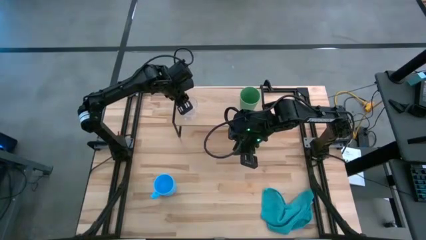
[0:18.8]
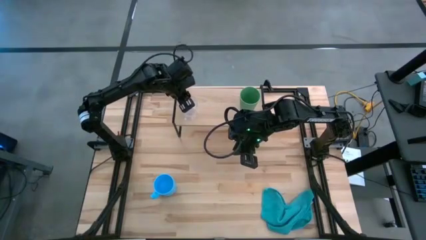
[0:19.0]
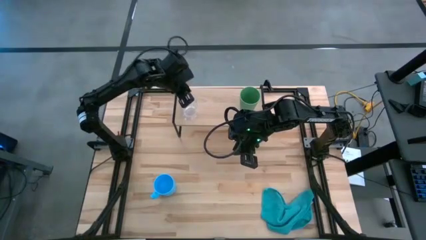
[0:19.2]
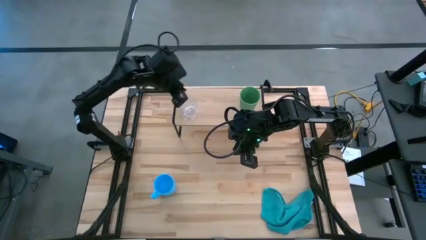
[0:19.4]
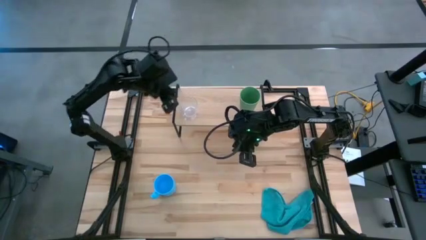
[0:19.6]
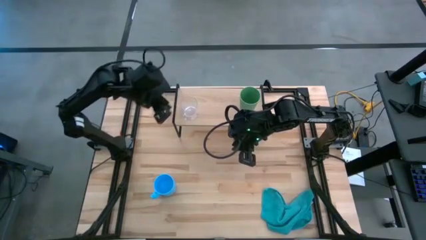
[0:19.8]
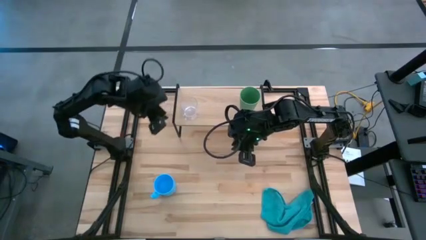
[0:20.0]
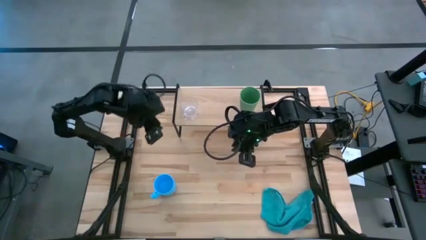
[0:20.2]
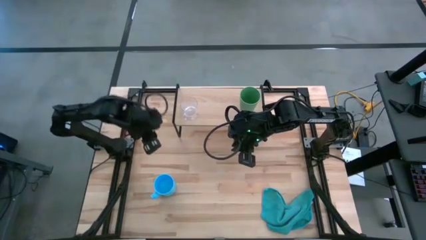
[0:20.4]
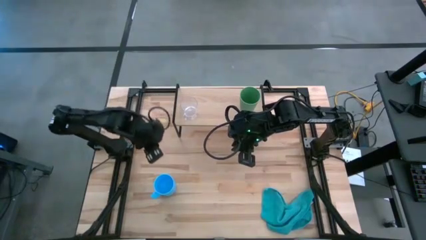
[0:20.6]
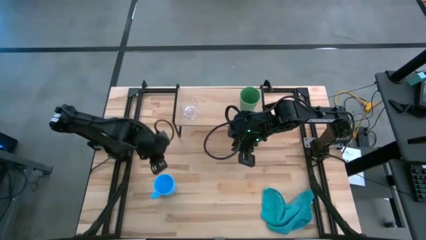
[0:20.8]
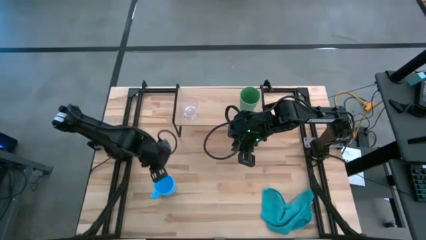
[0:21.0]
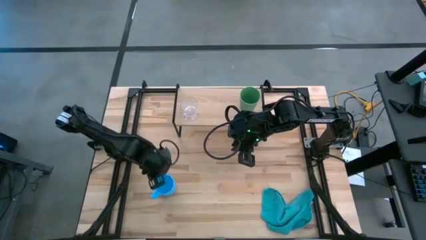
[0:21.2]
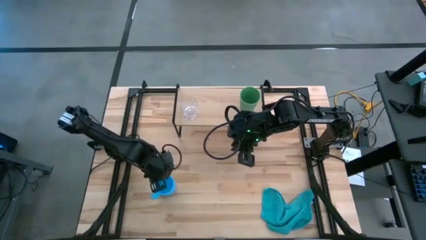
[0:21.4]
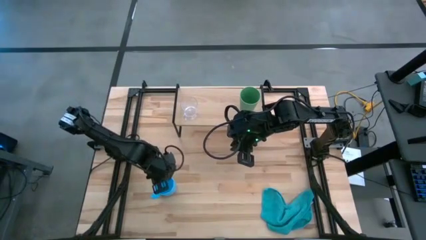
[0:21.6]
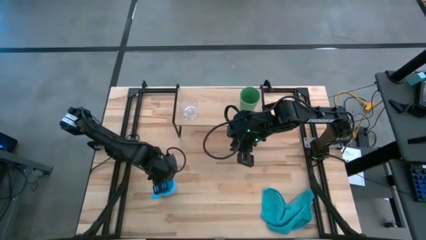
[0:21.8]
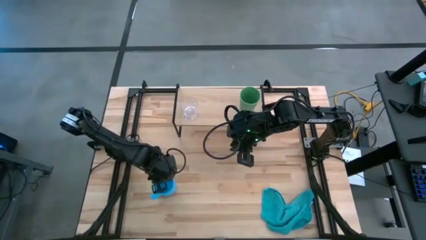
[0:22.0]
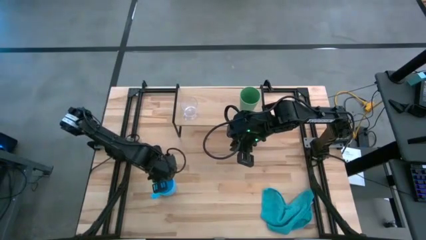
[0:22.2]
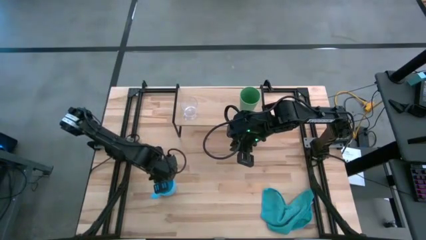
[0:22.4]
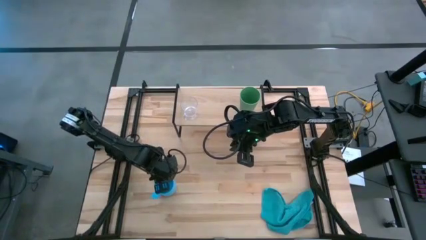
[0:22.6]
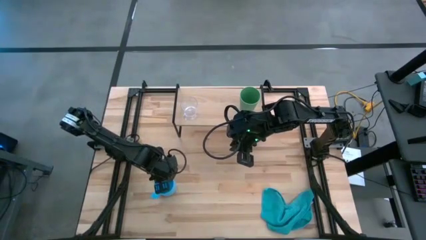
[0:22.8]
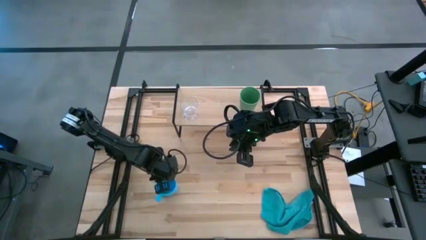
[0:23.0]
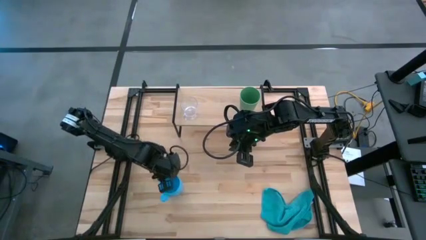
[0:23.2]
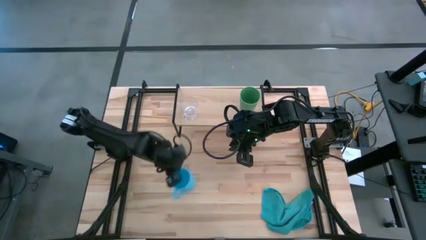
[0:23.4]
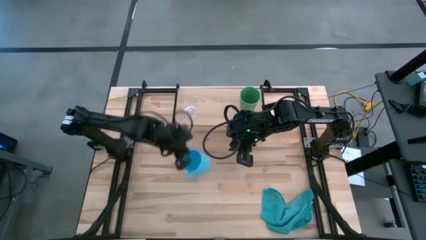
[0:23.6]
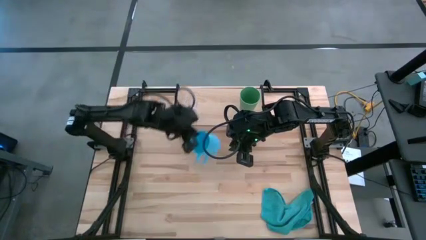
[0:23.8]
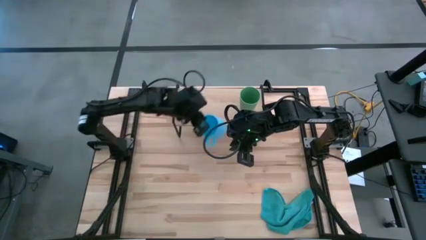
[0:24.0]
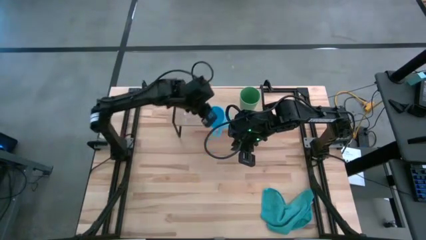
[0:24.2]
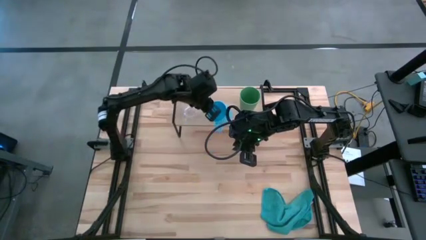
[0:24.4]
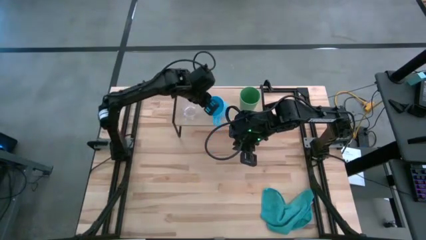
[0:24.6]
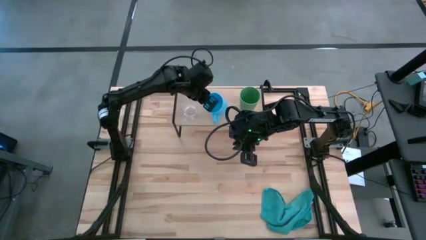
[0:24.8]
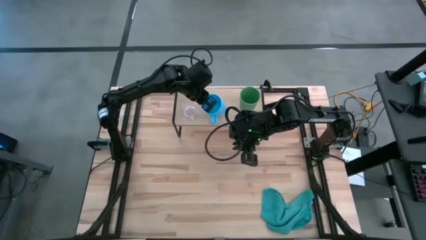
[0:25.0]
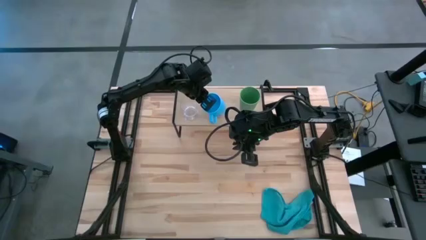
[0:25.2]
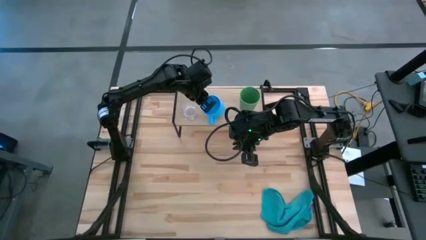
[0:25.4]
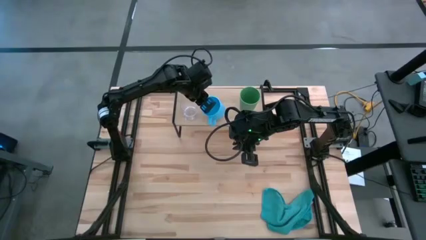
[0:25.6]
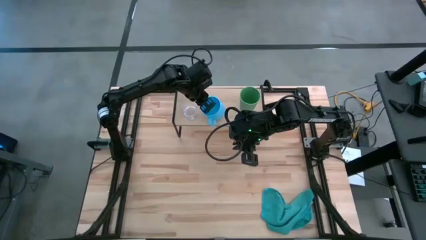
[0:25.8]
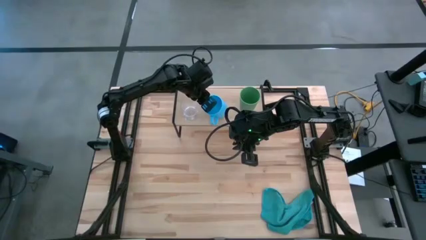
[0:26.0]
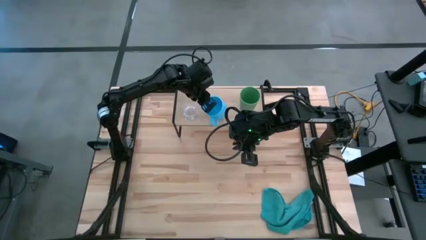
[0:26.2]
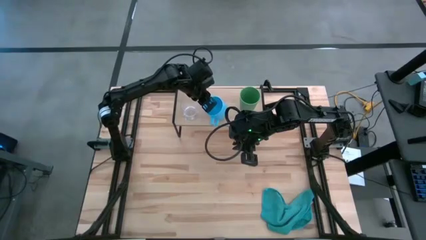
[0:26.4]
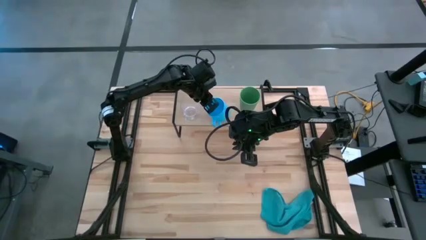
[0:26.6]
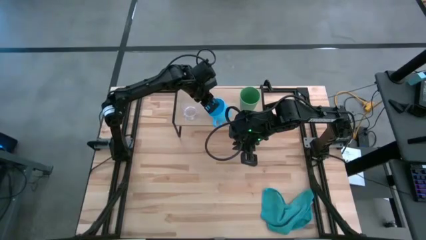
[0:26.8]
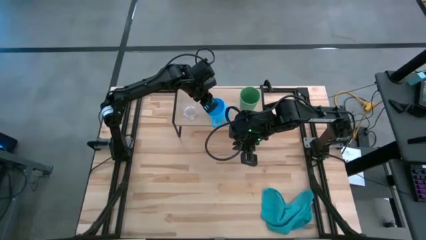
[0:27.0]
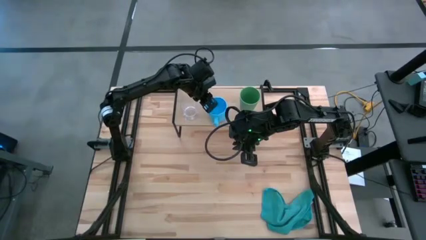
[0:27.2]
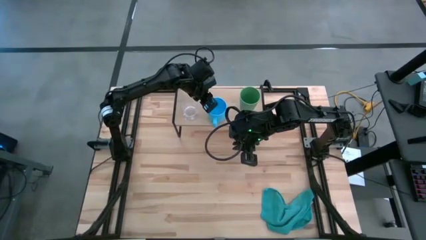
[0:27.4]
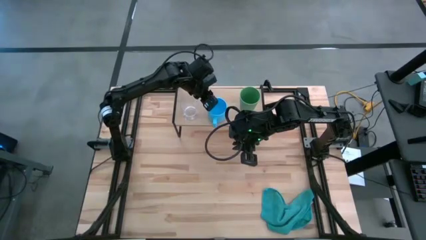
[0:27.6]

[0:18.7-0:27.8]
Task: Stack small to large cups/mugs on shelf
Put the blue mug on the shelf

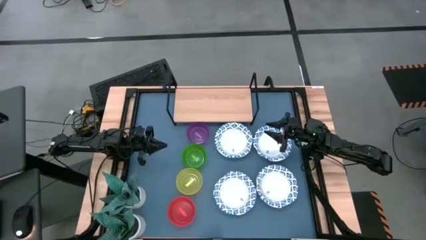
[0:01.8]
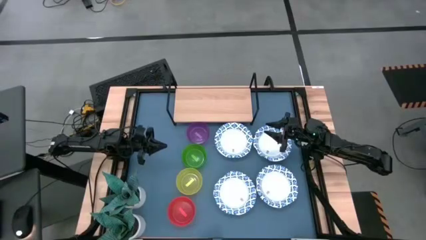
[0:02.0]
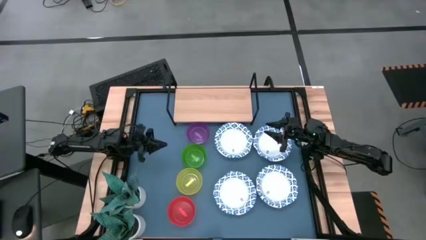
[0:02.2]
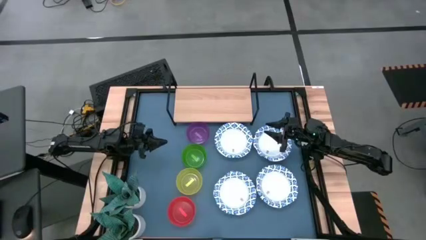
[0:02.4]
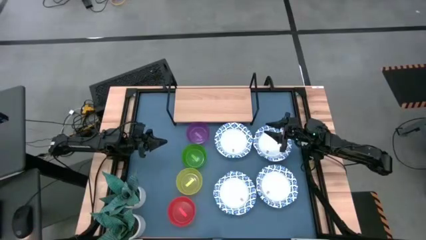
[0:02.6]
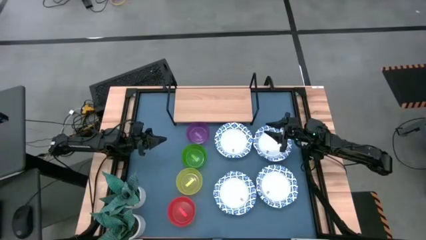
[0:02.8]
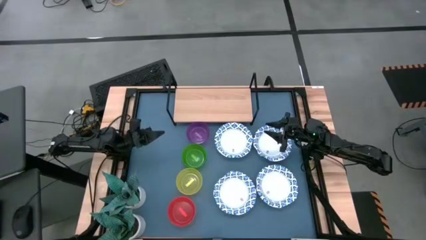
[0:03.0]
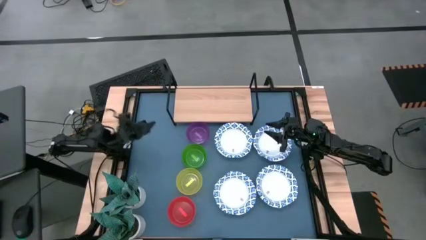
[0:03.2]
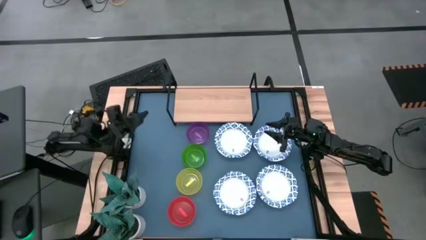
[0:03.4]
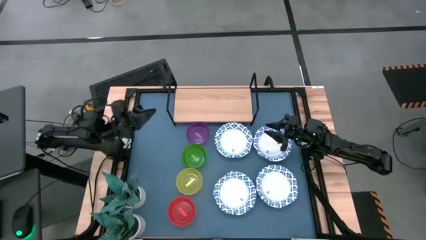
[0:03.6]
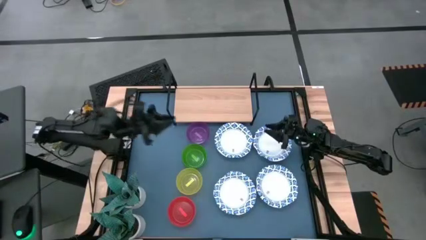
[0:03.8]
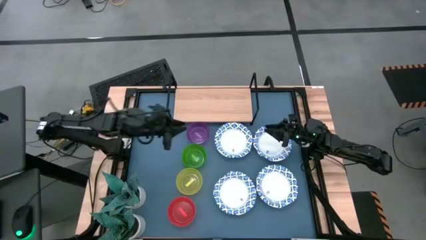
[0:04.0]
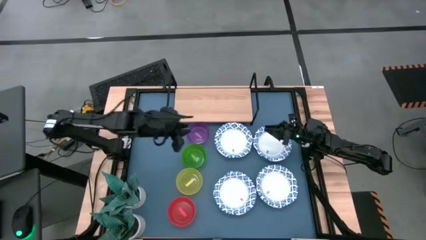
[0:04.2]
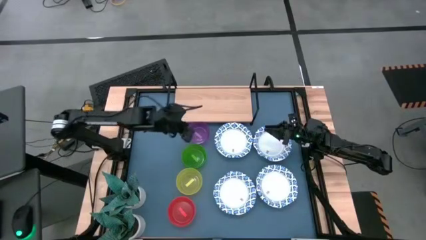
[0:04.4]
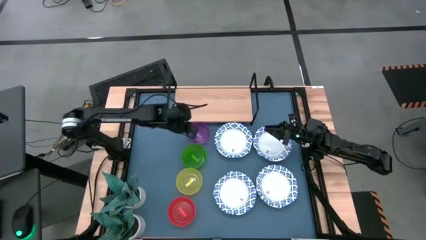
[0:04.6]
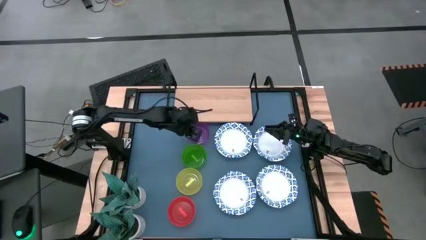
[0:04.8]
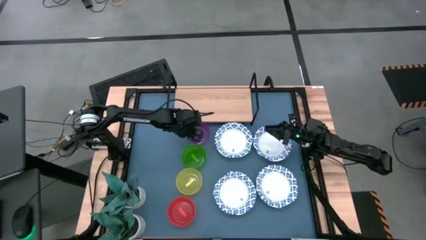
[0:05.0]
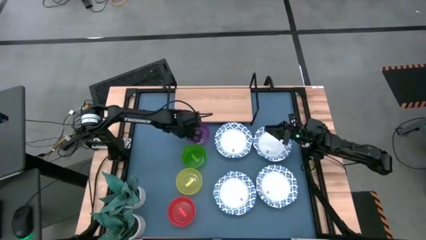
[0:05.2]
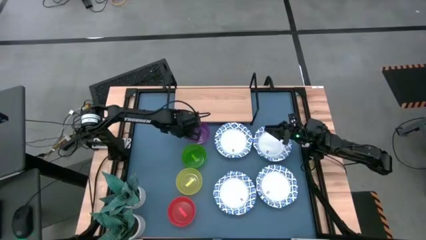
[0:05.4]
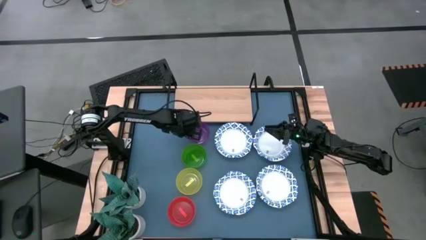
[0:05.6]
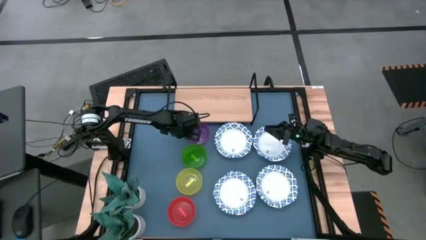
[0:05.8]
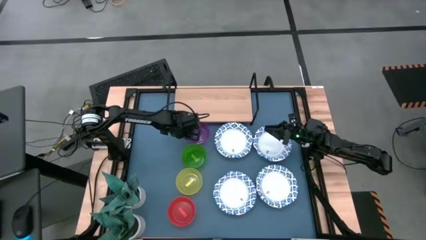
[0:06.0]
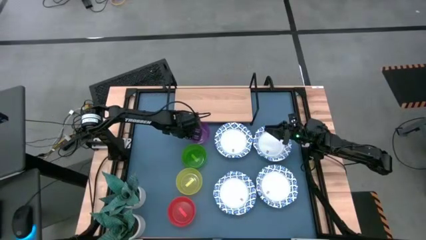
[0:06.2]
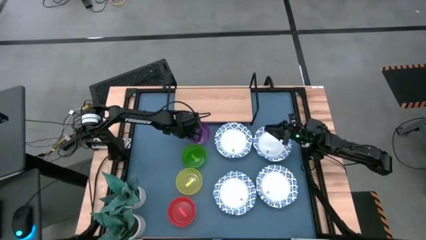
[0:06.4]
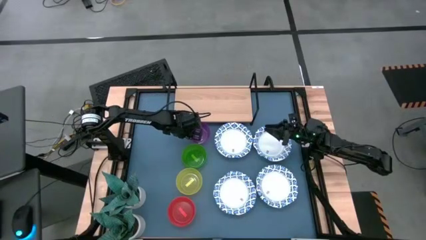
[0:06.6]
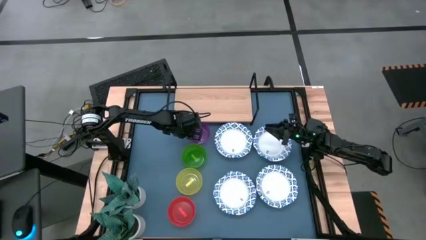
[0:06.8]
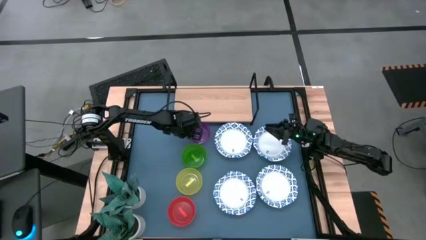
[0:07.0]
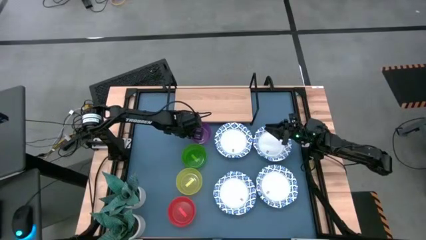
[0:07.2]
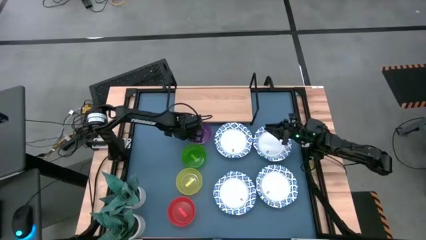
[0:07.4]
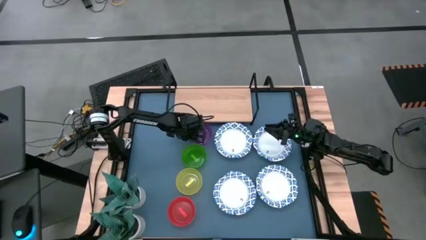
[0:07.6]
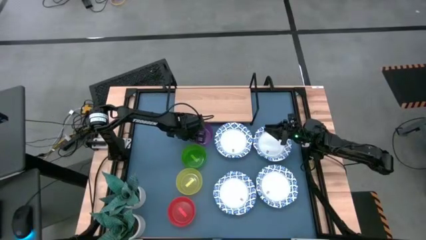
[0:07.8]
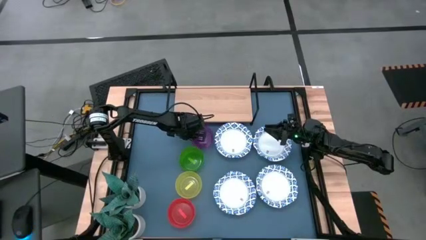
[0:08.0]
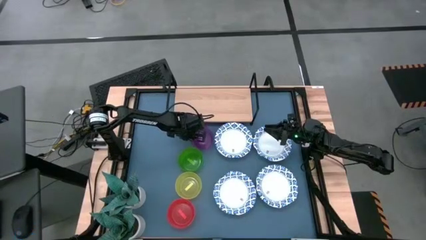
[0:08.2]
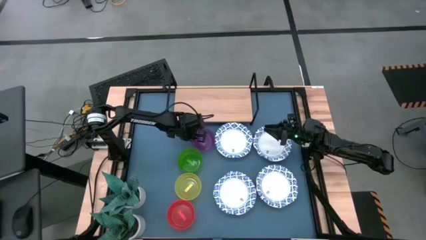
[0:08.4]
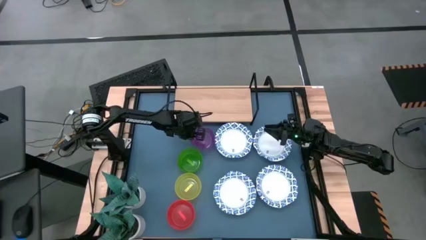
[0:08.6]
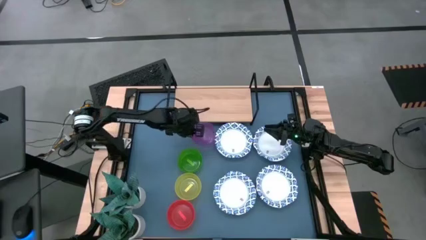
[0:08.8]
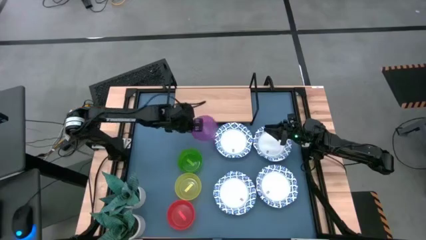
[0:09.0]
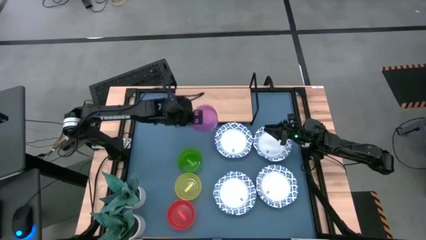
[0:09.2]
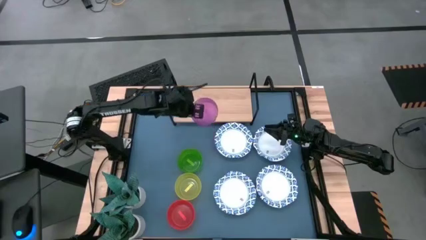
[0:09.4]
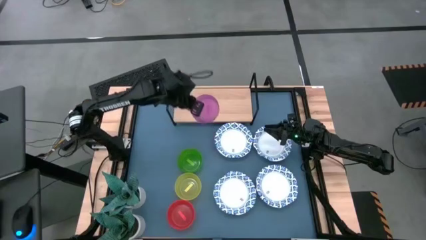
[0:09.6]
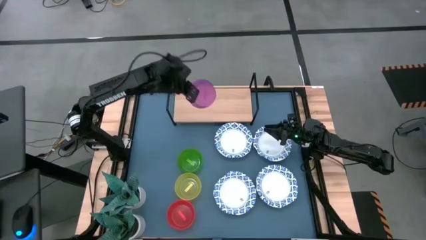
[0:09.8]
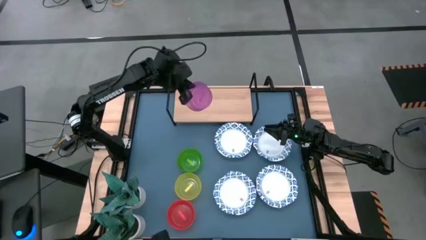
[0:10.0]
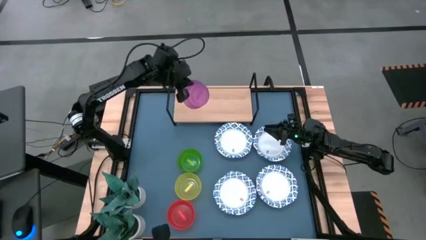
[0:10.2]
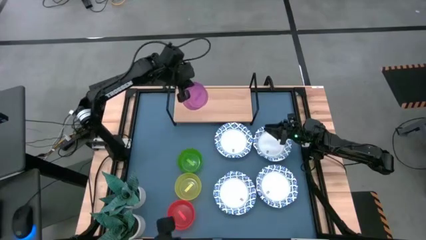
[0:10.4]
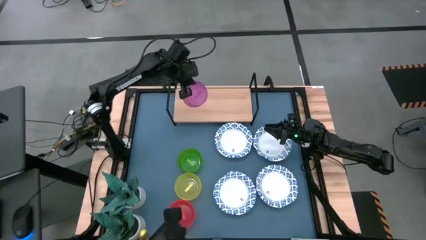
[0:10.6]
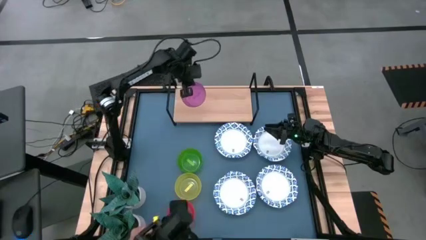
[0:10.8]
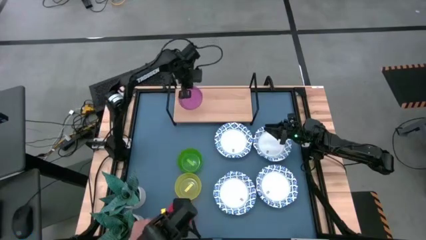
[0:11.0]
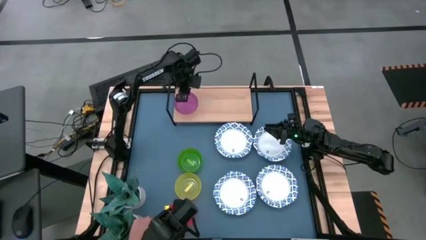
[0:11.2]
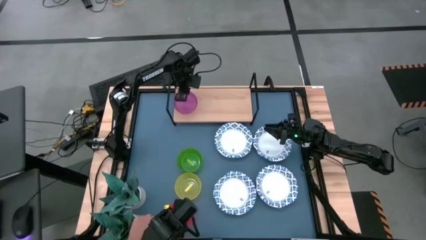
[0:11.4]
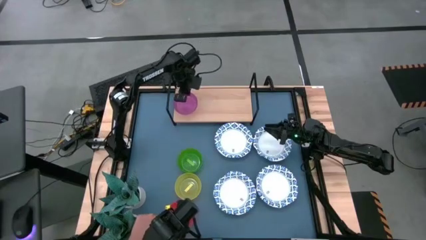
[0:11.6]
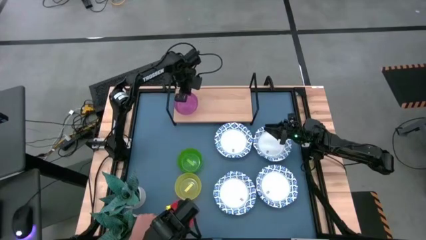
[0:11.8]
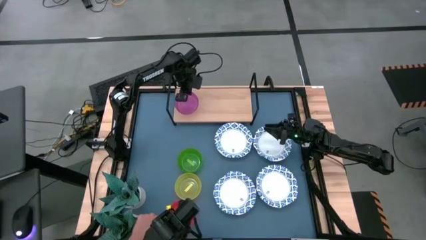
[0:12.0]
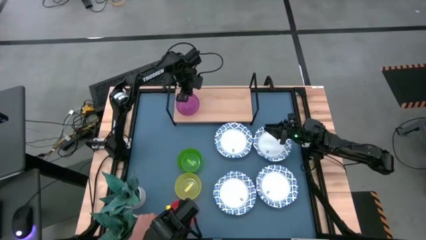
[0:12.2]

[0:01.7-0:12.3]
Task: Place and stack bowls onto a shelf
Put the purple transparent bowl on the shelf
